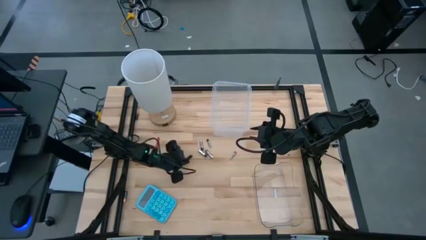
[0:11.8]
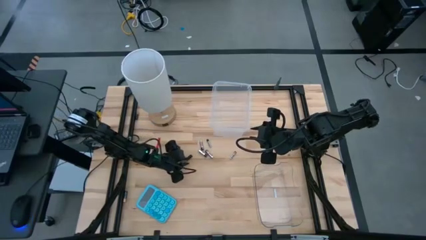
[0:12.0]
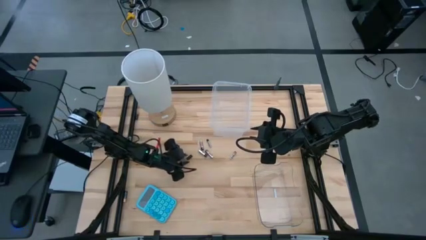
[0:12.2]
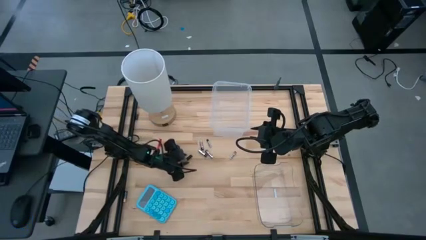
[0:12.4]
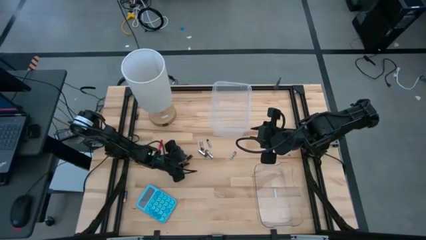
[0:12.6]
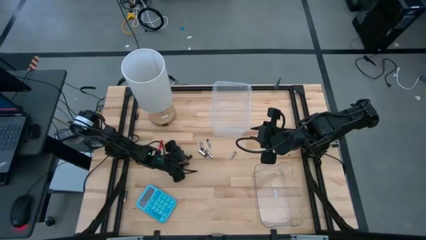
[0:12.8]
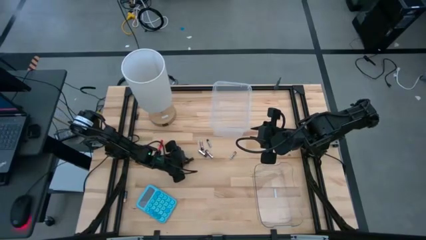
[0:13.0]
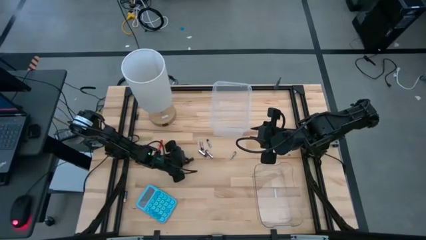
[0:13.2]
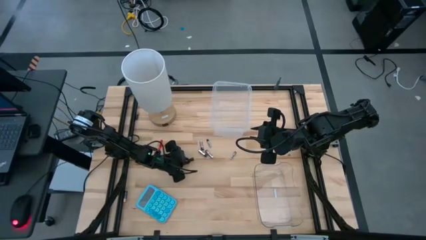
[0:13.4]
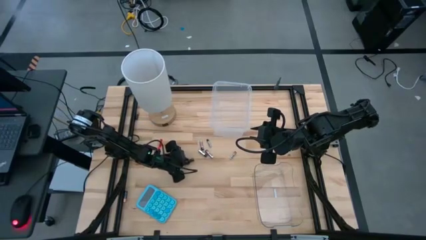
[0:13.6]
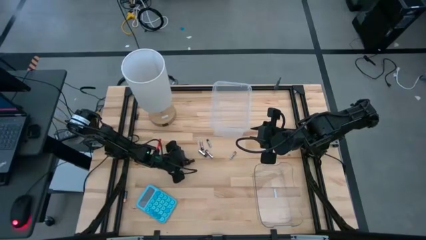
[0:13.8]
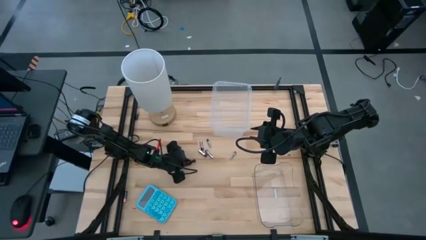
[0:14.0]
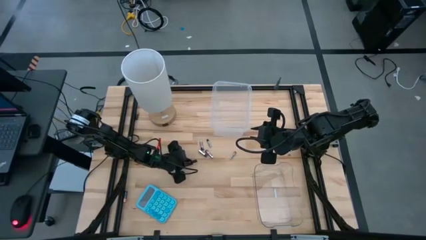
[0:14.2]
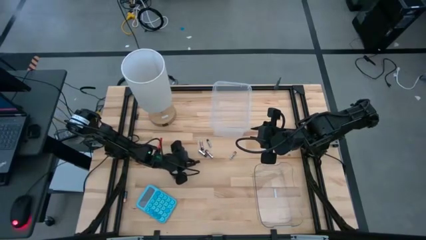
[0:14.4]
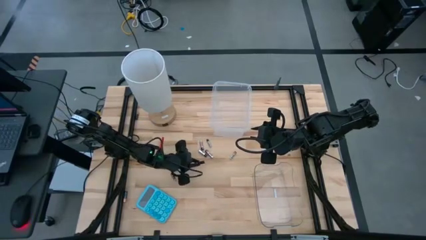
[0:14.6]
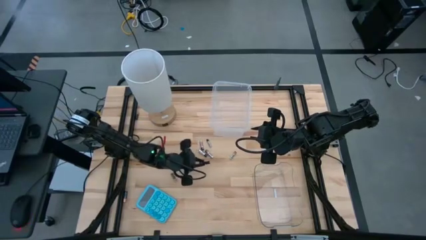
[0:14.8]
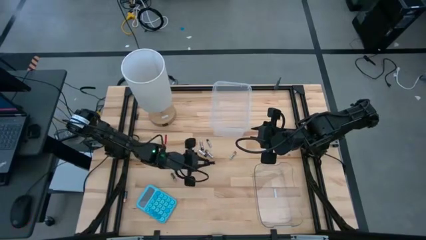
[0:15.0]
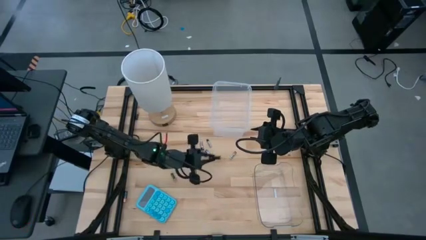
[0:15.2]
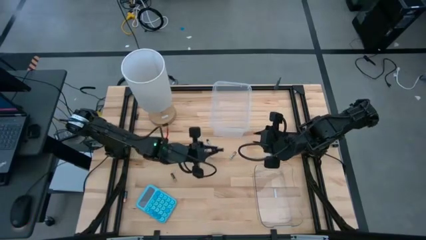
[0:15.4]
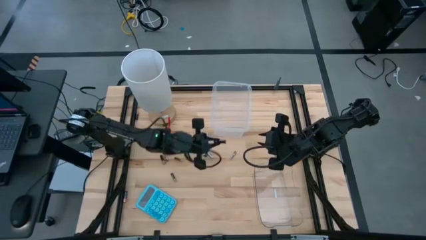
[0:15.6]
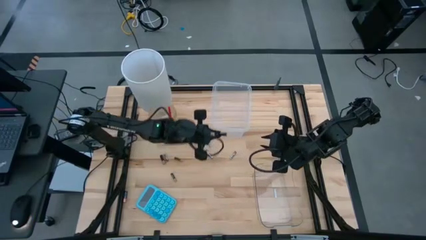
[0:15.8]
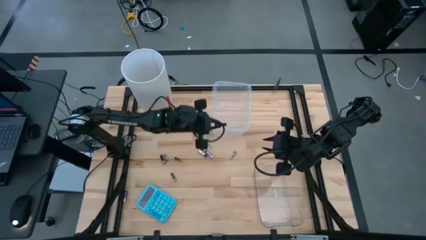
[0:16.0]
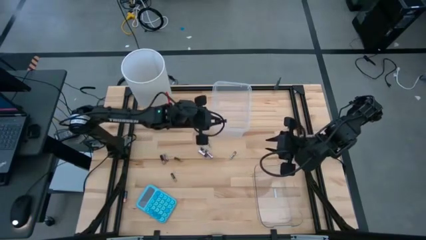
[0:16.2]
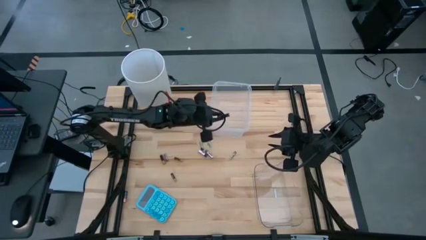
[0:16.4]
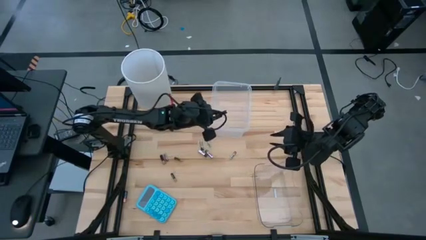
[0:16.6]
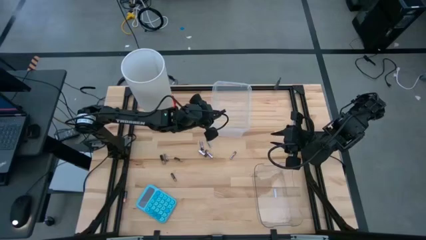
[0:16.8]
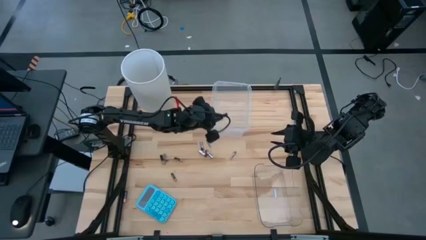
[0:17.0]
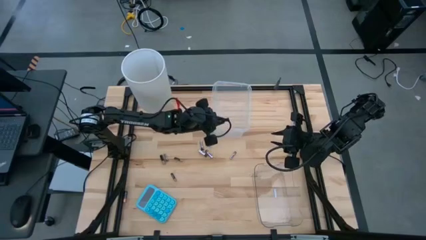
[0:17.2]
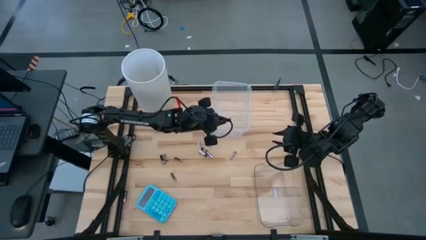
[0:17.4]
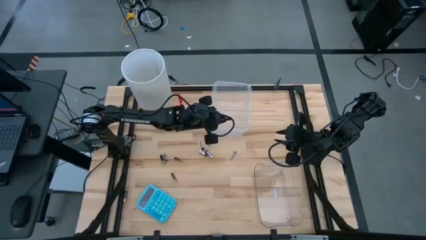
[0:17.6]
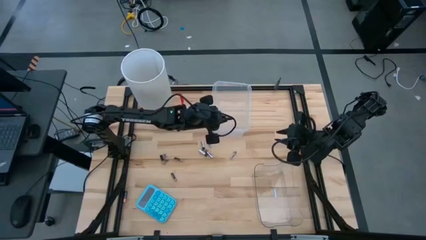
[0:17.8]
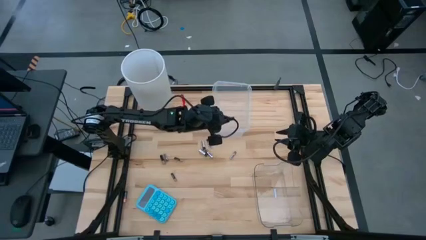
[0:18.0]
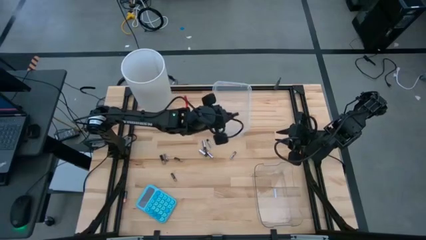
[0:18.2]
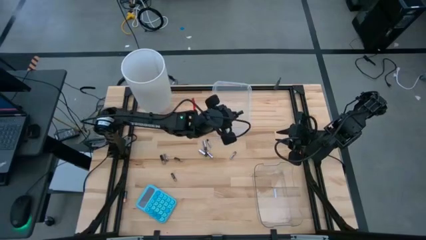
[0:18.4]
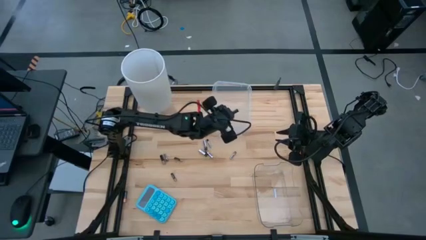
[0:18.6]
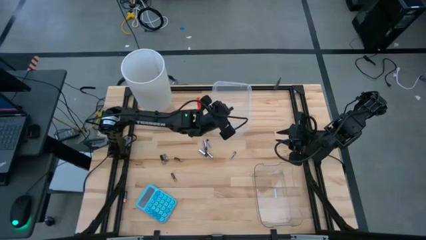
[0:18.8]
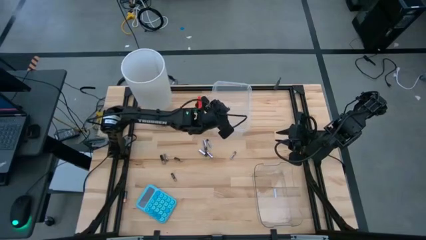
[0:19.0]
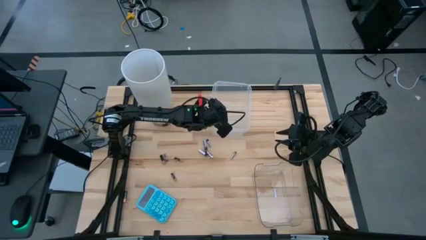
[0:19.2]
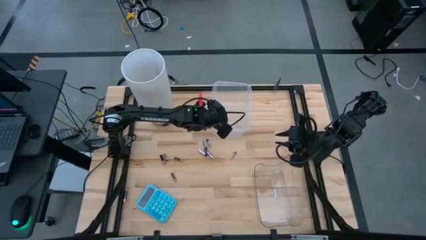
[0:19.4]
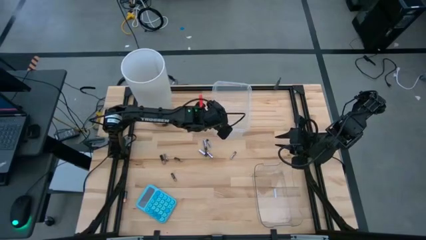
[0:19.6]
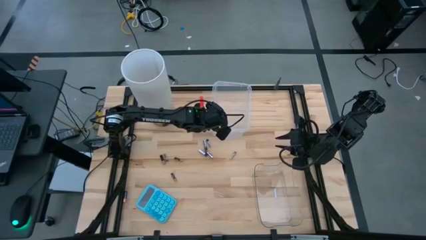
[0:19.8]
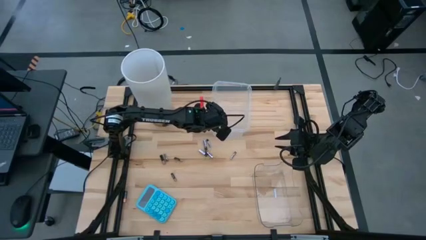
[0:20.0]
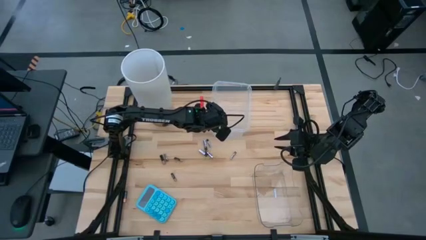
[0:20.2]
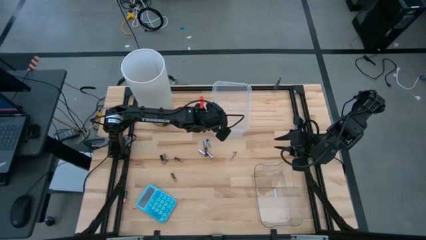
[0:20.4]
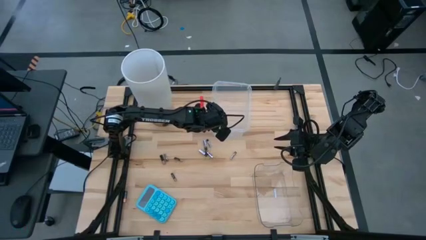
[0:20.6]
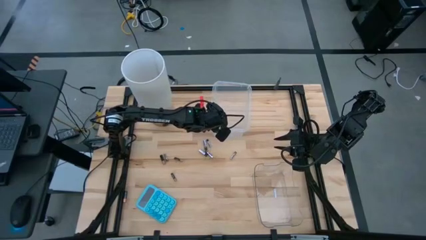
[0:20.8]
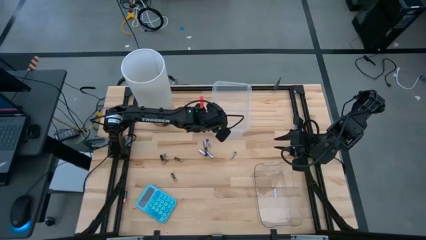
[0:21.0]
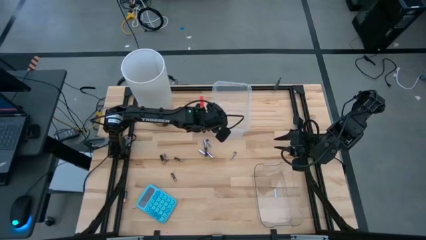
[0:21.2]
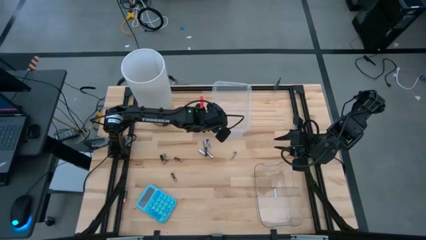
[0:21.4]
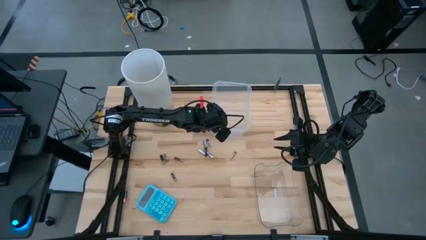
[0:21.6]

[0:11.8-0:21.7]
Task: Sort batteries
Put the brown battery into the top transparent bin

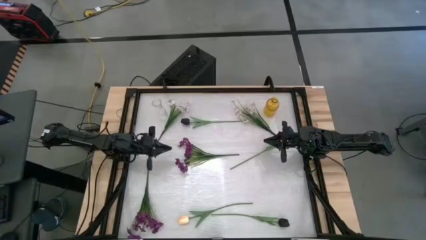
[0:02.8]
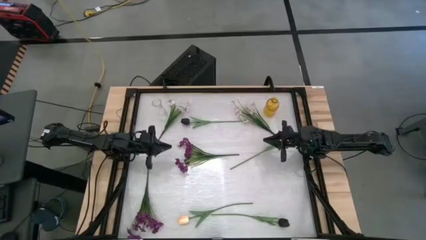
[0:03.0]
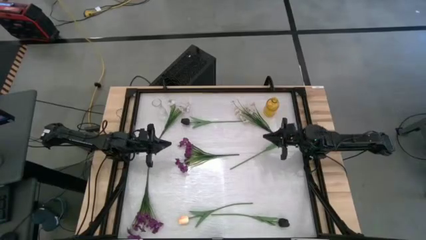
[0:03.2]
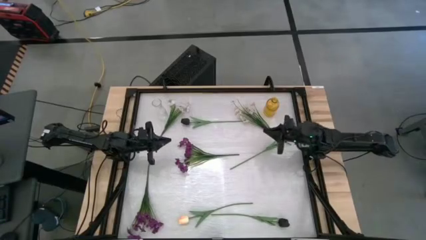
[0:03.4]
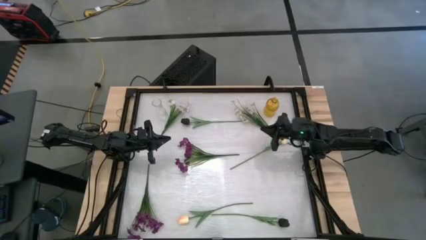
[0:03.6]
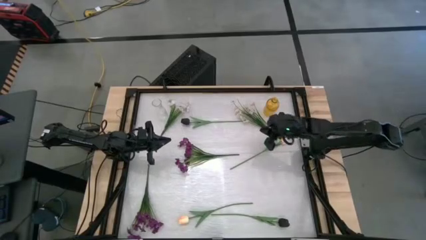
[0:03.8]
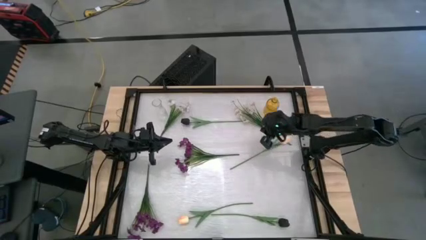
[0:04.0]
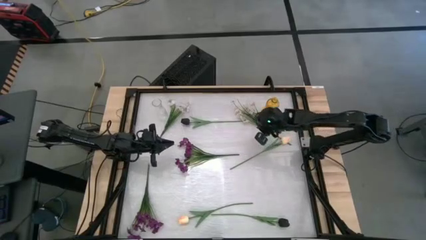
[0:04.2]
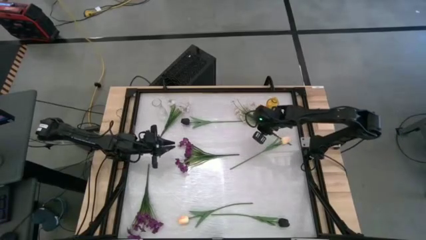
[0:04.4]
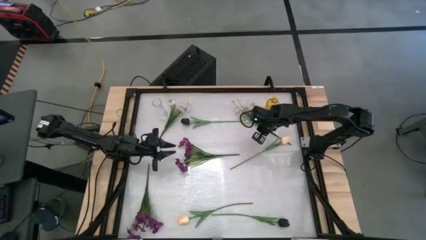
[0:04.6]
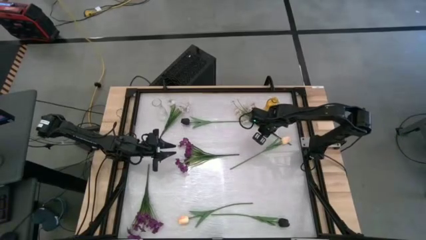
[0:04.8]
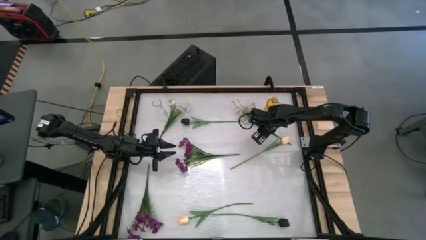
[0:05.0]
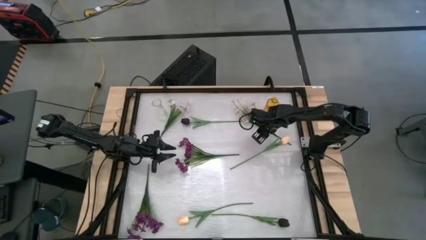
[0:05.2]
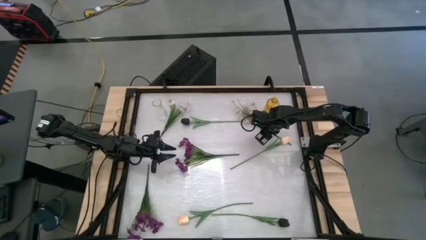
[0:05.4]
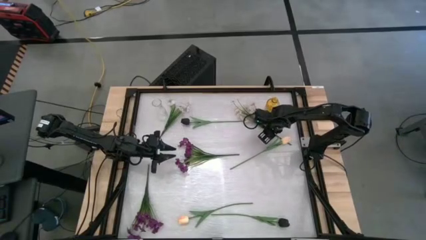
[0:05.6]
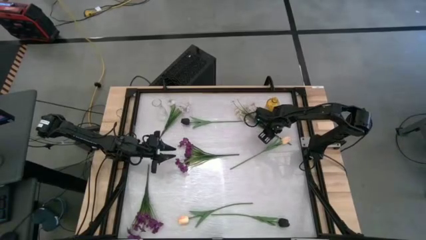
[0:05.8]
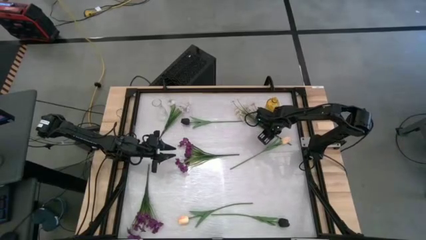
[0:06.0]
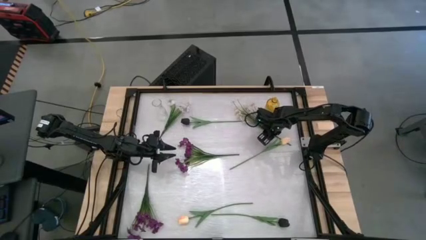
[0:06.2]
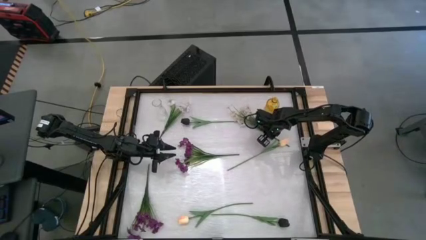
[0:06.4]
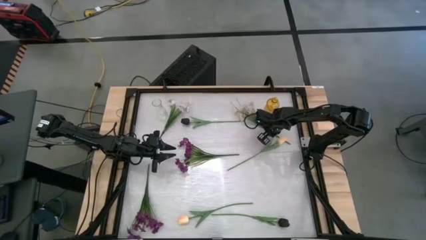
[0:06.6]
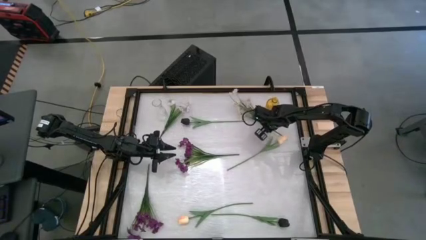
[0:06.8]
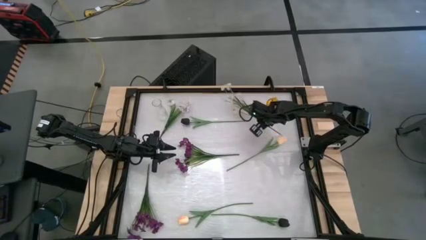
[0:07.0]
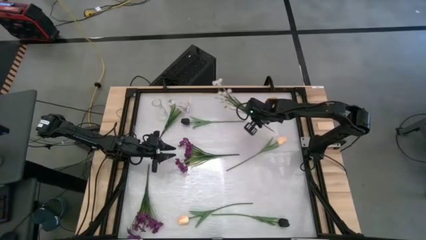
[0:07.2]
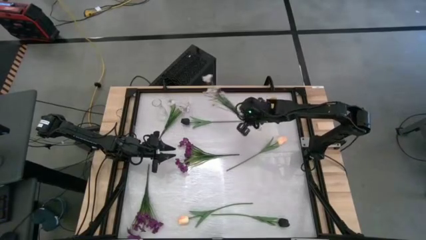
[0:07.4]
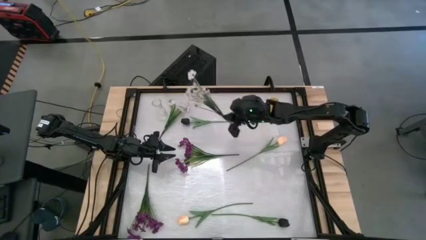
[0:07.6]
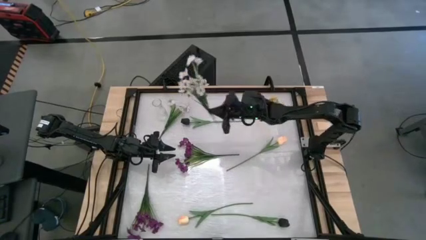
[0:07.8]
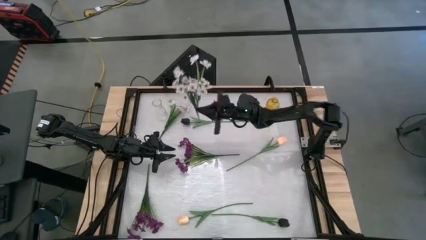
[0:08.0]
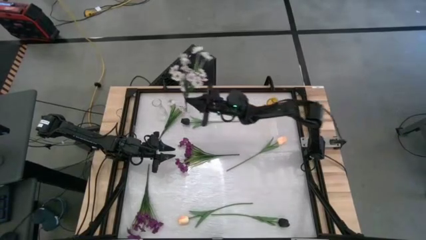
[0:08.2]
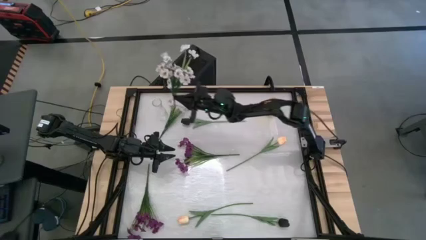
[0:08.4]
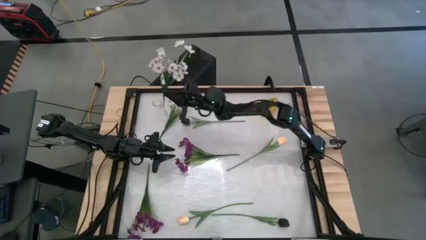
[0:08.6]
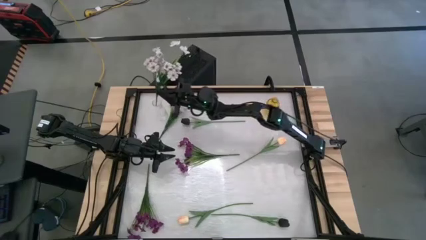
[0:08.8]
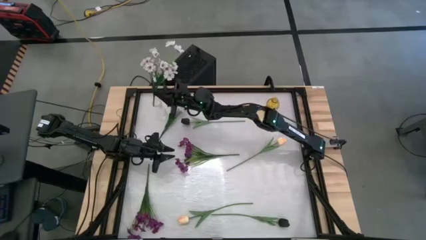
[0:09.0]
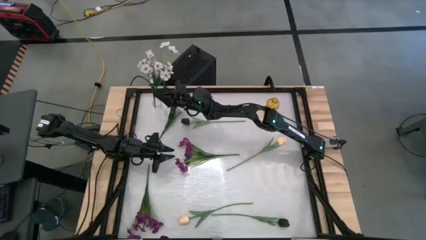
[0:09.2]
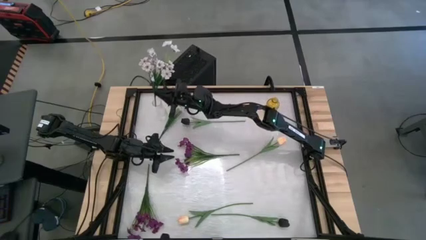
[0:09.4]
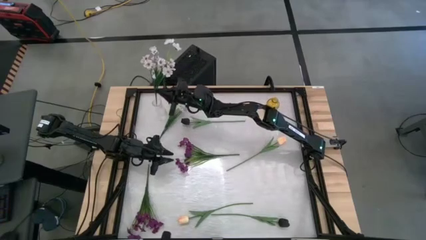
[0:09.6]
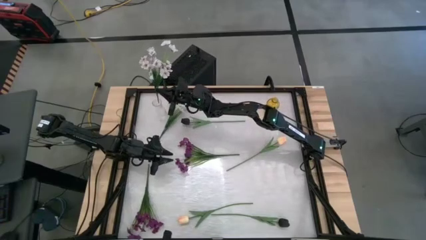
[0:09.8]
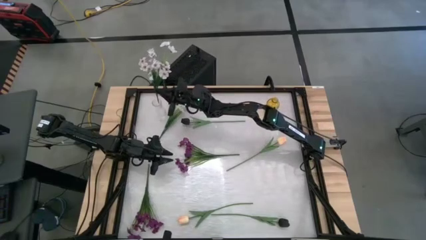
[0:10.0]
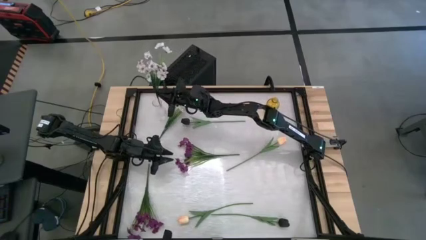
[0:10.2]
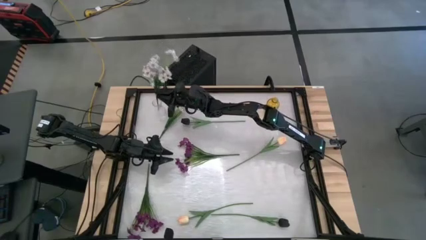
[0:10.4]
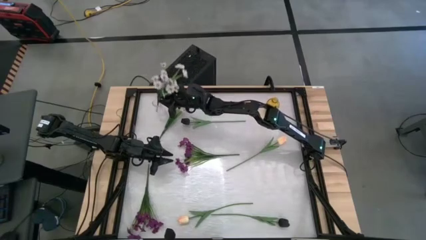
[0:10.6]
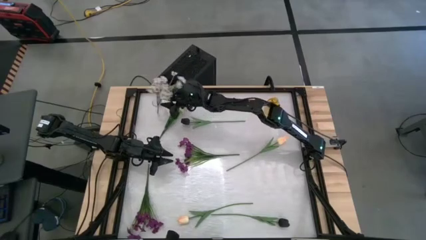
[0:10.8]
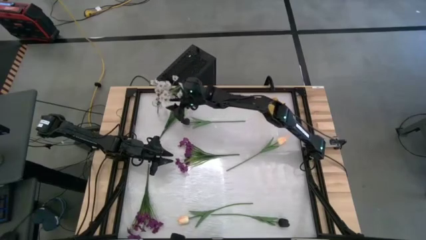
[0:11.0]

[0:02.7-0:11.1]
Task: Sort flowers into vase by color
Put the right white flowers into the transparent vase
